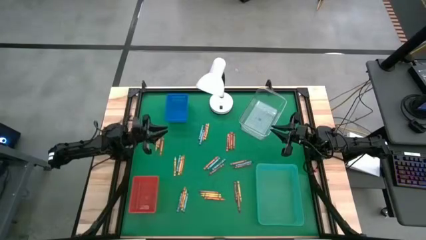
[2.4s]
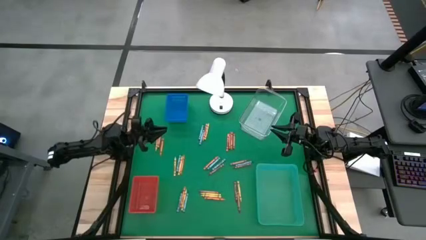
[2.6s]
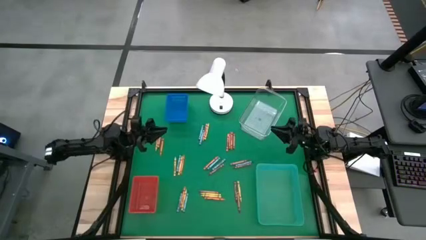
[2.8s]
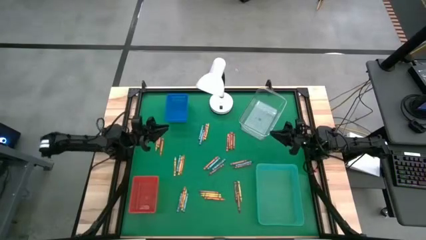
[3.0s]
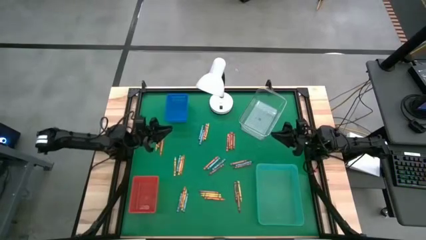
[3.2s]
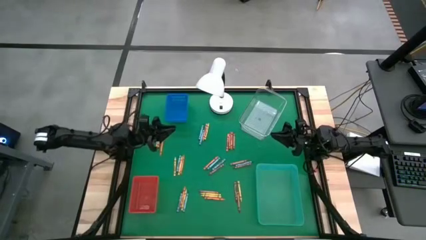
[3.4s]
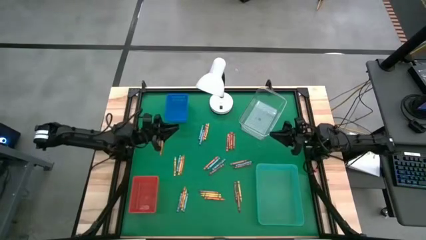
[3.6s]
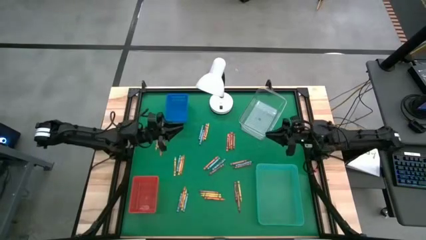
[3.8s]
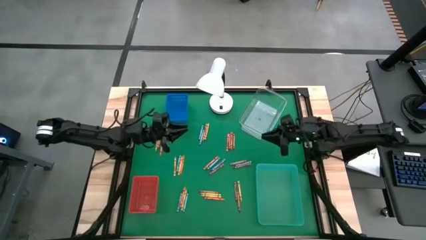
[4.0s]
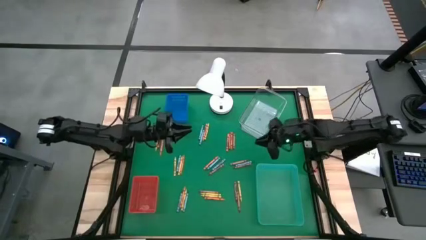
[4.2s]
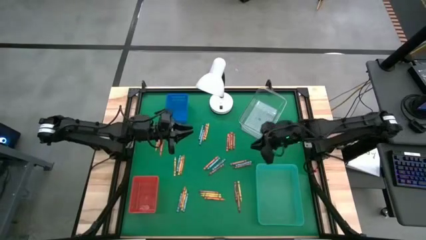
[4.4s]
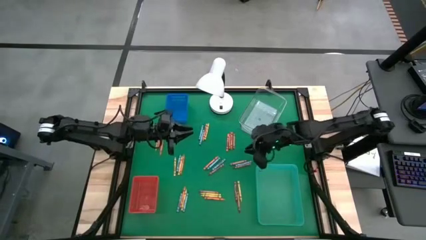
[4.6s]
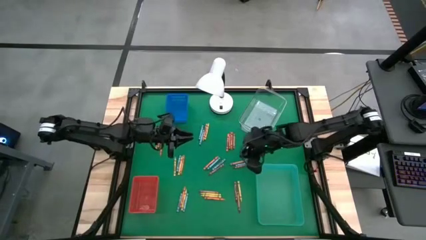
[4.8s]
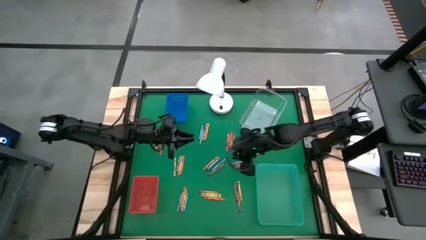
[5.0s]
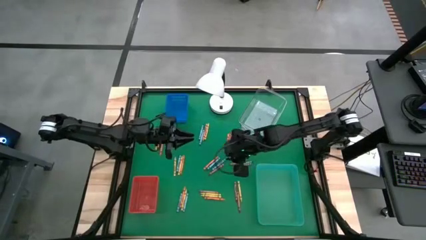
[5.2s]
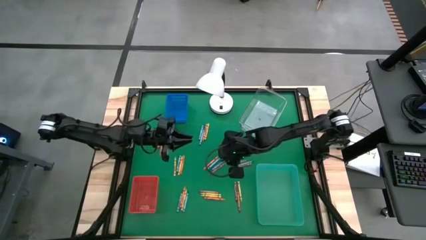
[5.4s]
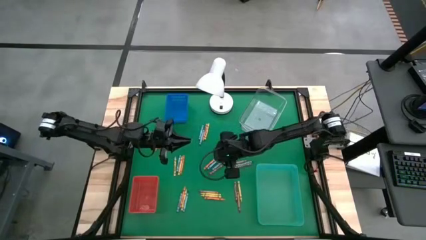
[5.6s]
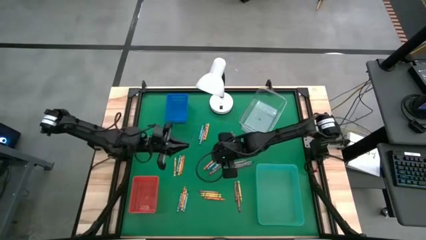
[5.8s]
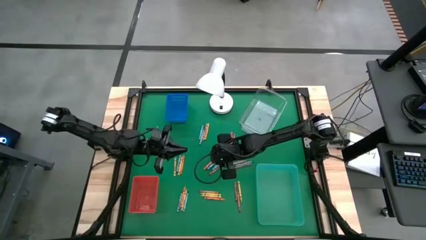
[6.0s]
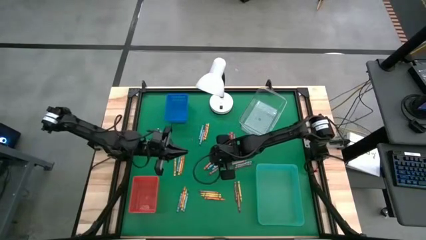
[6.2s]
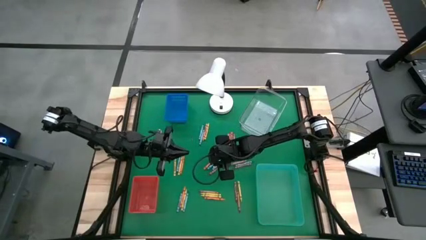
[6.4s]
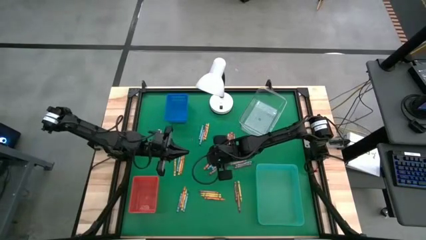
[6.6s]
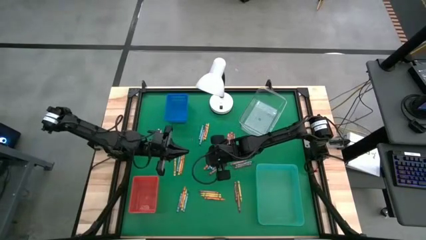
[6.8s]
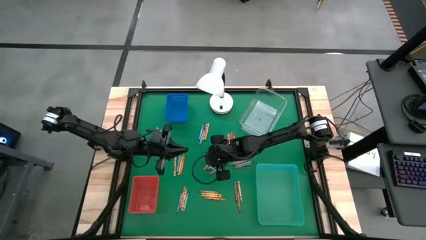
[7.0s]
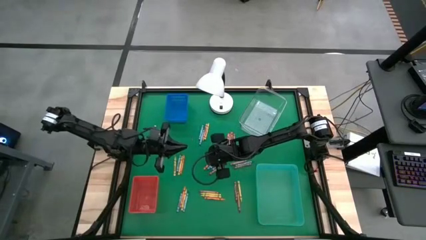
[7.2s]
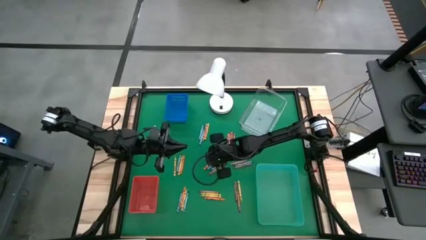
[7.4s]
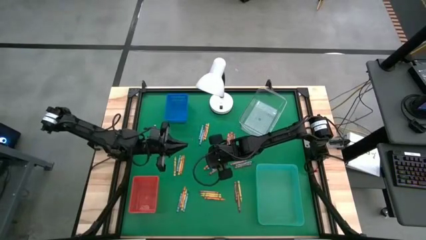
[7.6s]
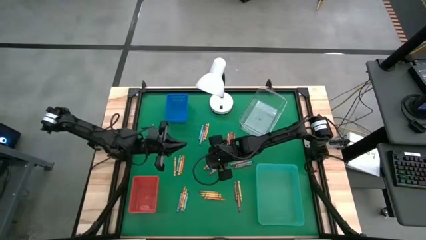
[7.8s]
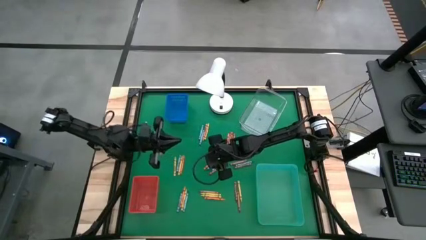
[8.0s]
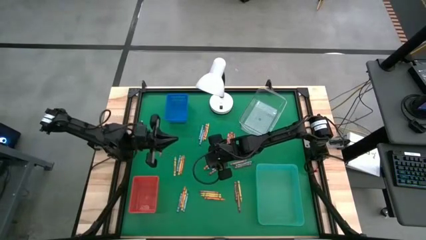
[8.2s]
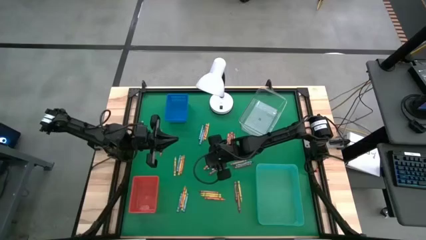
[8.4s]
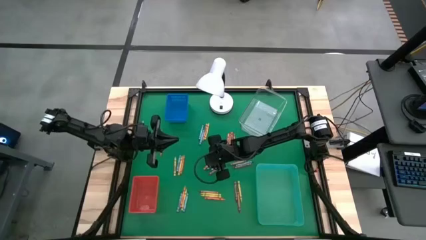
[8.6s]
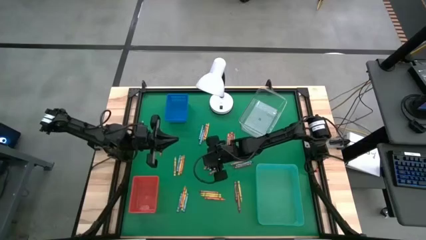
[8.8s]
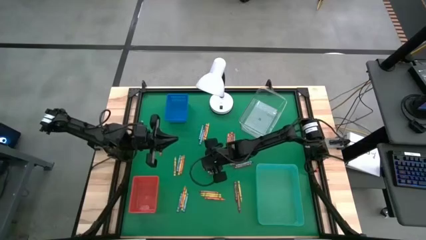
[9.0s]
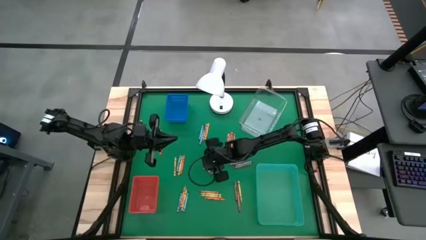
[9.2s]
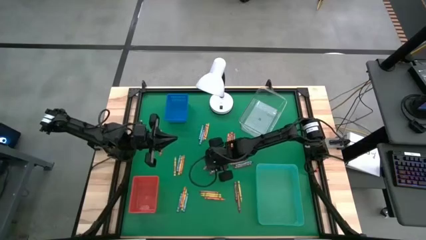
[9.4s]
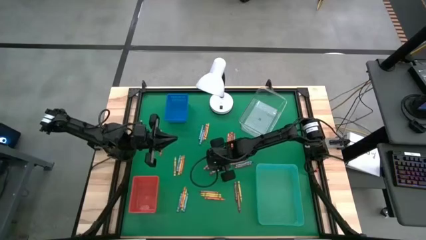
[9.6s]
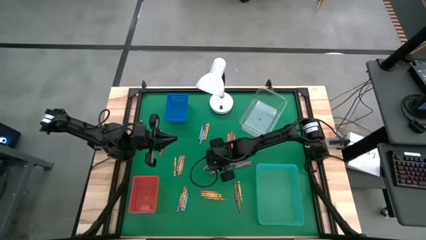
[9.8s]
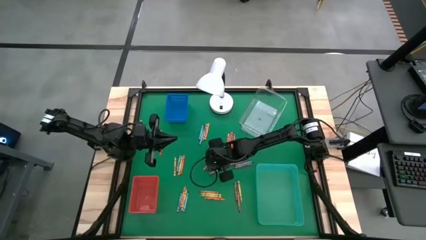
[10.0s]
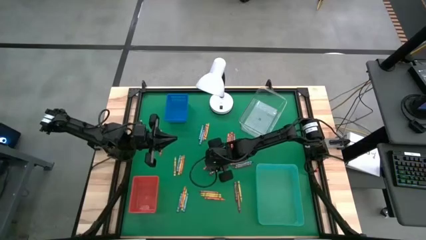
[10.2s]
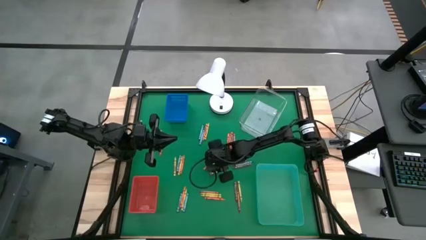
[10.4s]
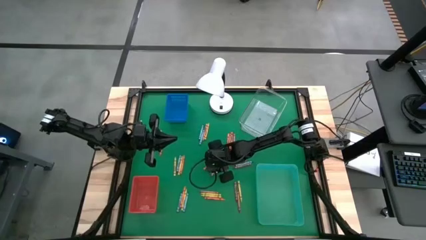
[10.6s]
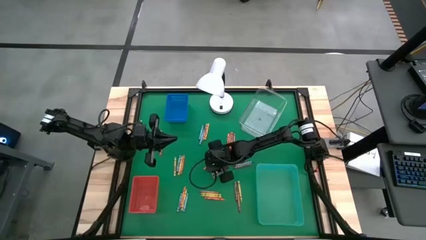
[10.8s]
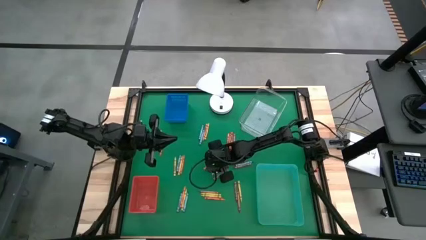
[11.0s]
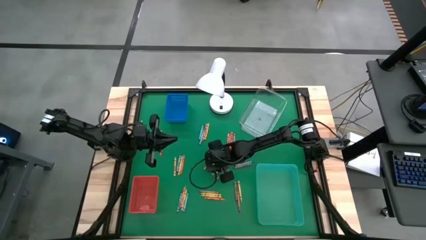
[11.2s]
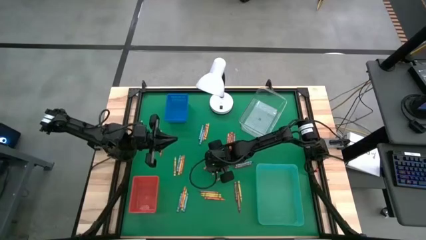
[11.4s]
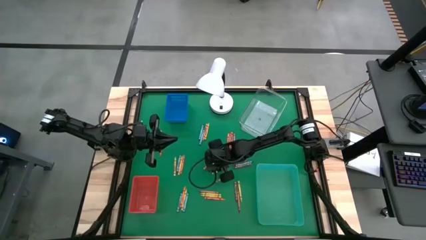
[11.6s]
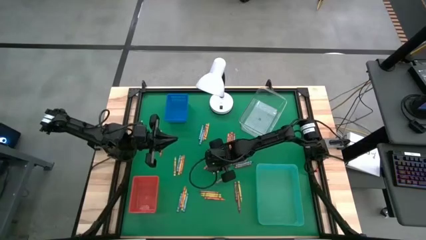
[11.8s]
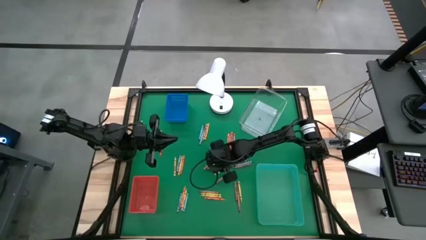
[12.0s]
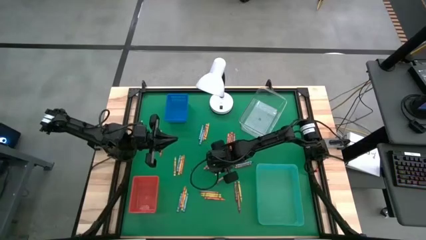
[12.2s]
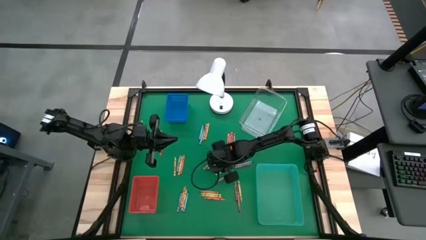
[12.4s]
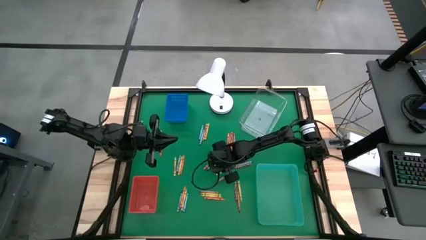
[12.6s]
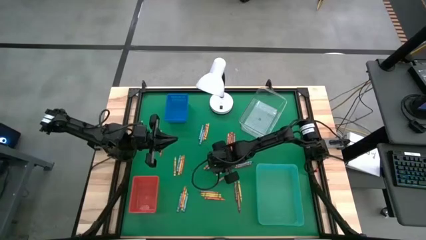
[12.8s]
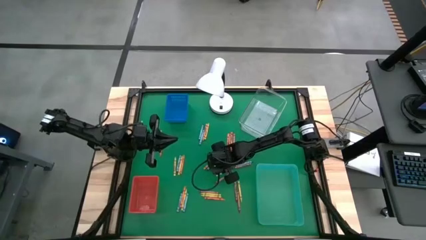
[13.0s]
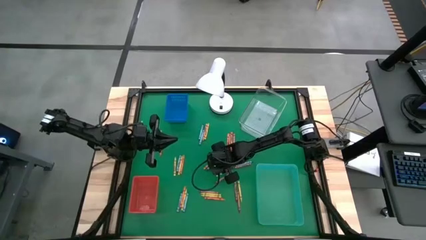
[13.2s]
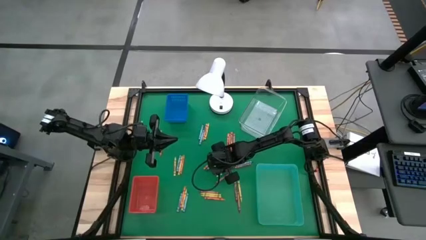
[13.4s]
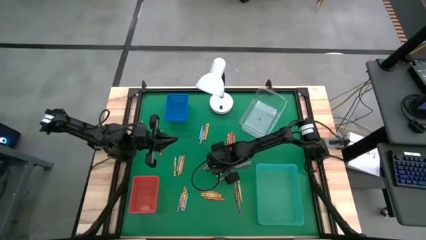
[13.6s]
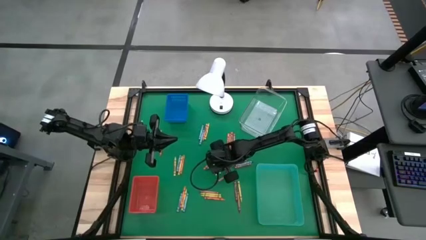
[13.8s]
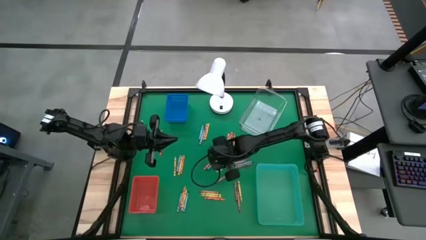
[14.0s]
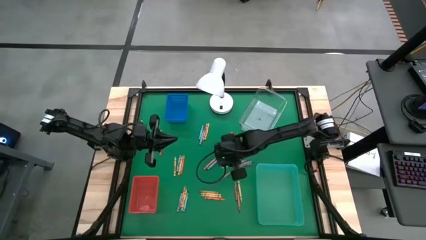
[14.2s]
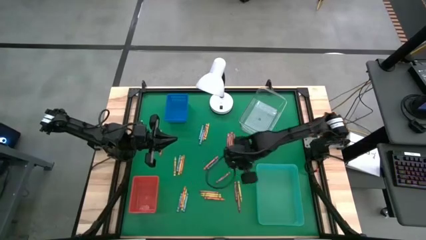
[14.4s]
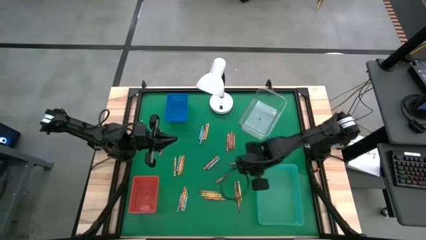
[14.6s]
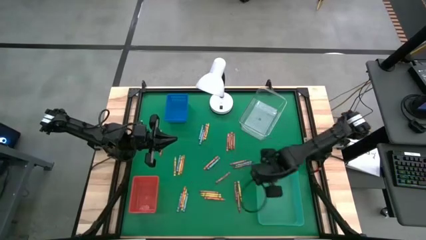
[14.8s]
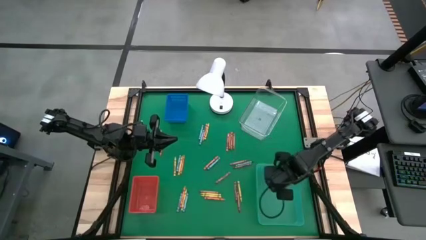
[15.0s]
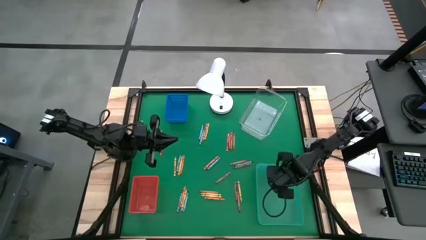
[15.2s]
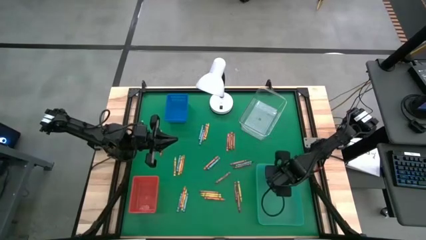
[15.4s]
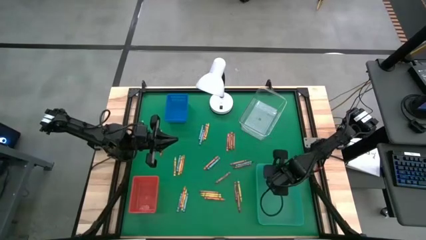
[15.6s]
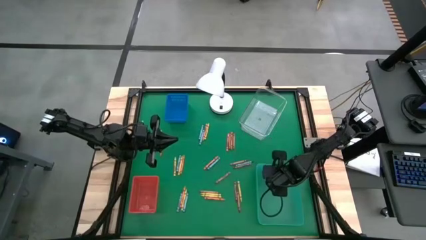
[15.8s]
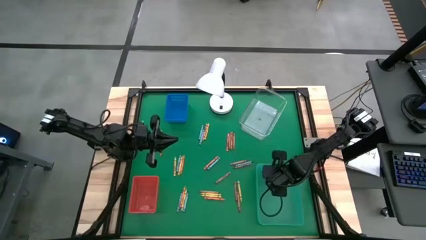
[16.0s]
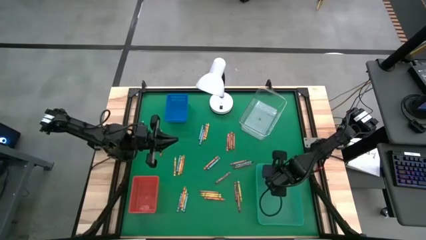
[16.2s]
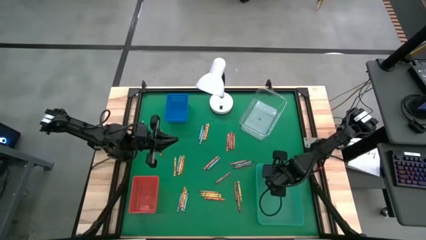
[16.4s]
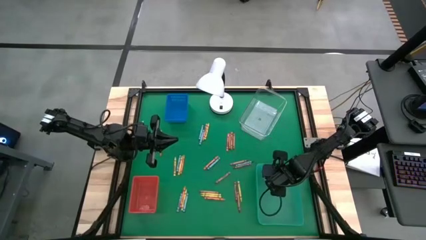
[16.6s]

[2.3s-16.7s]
Task: Sort crayons
Put the blue crayon into the green bin
